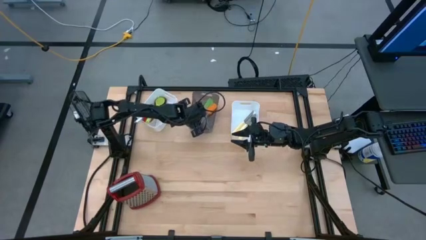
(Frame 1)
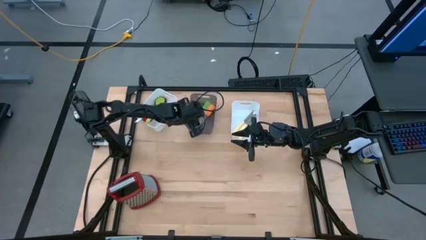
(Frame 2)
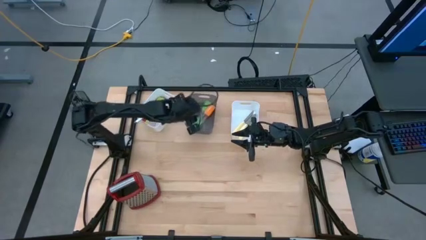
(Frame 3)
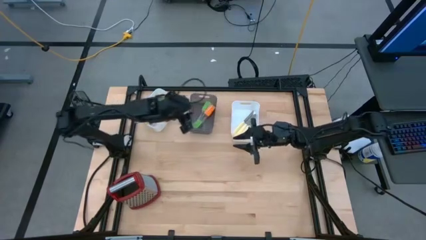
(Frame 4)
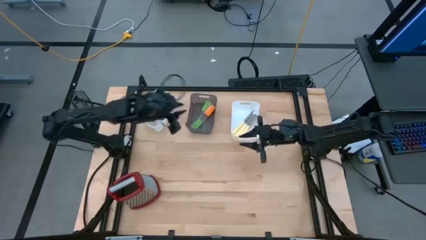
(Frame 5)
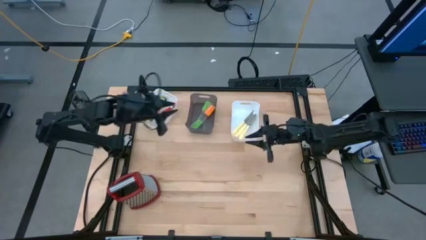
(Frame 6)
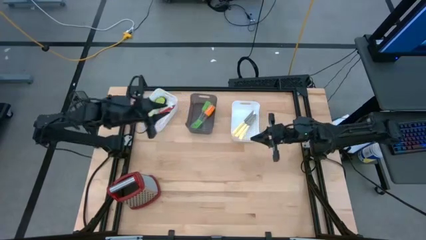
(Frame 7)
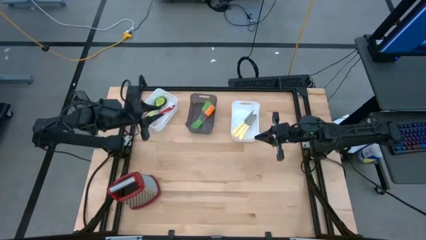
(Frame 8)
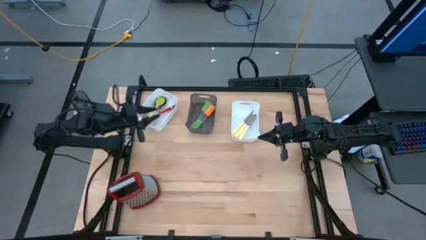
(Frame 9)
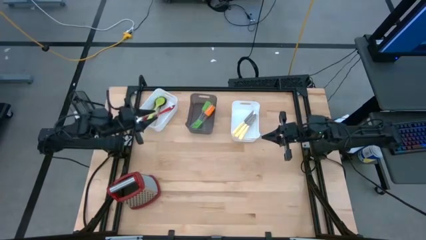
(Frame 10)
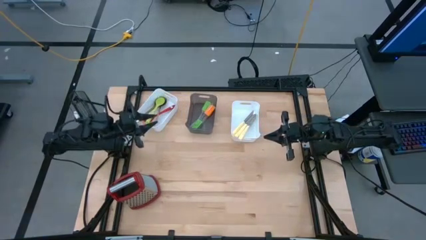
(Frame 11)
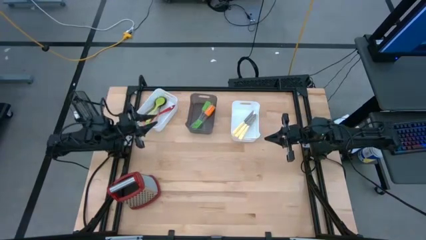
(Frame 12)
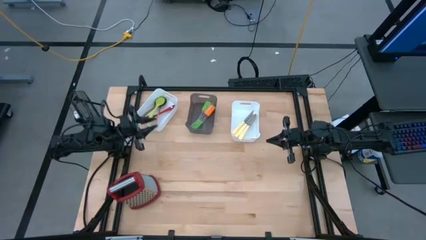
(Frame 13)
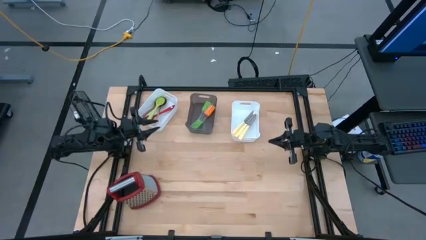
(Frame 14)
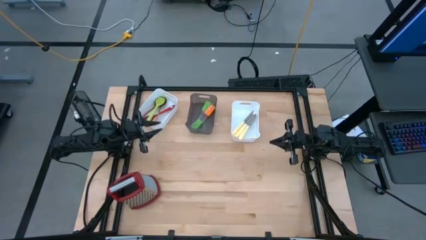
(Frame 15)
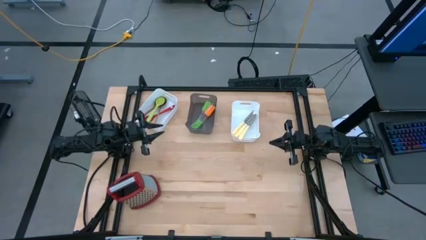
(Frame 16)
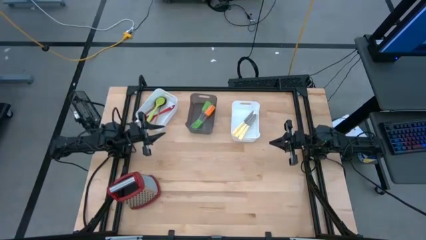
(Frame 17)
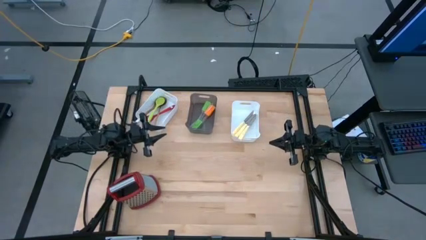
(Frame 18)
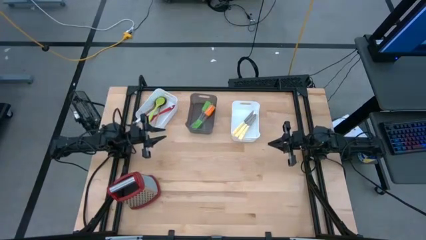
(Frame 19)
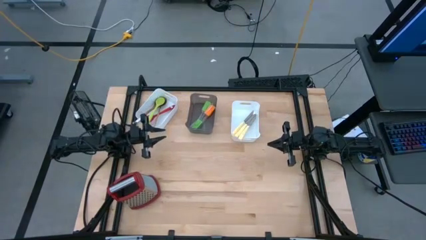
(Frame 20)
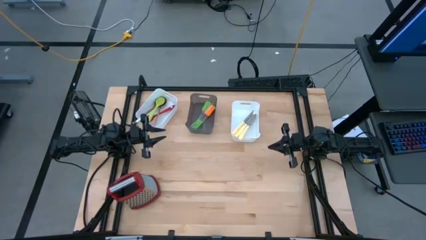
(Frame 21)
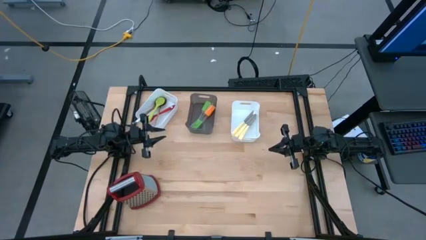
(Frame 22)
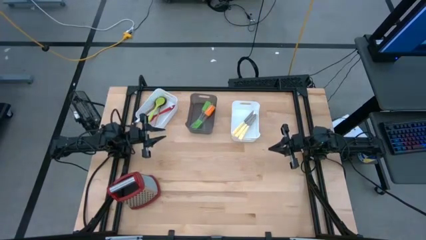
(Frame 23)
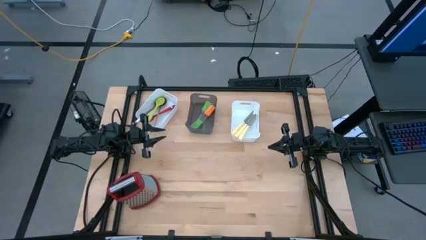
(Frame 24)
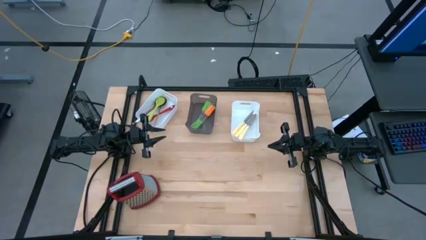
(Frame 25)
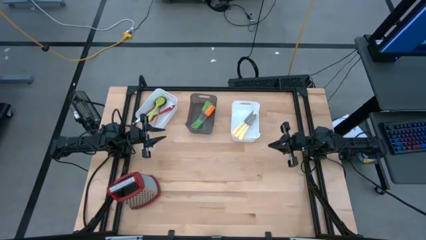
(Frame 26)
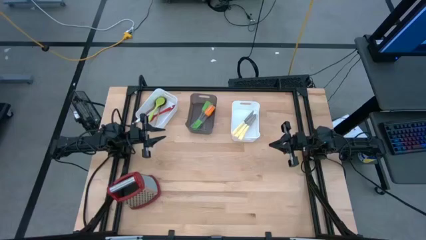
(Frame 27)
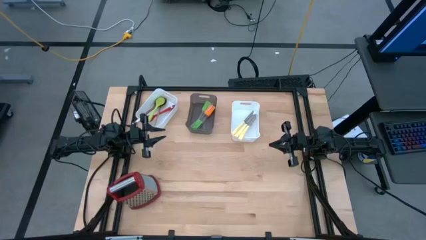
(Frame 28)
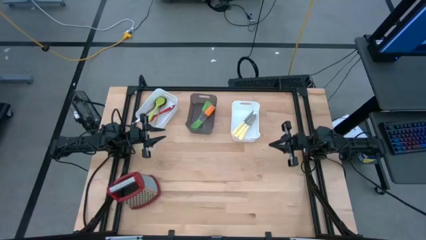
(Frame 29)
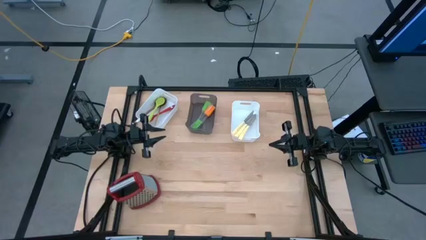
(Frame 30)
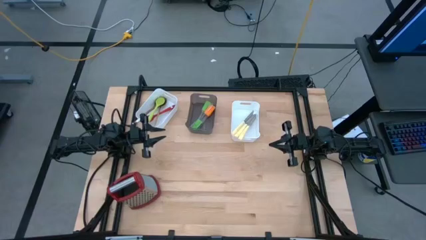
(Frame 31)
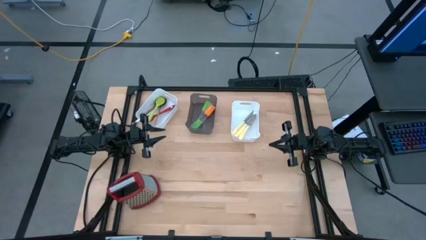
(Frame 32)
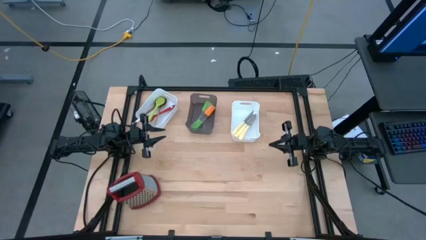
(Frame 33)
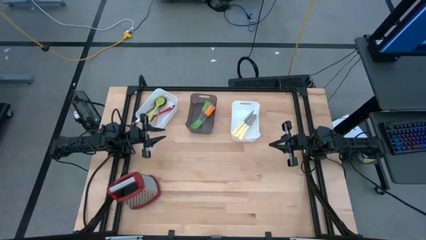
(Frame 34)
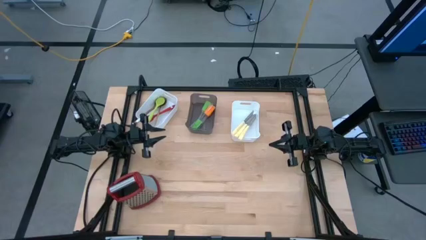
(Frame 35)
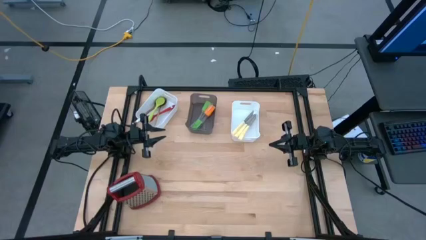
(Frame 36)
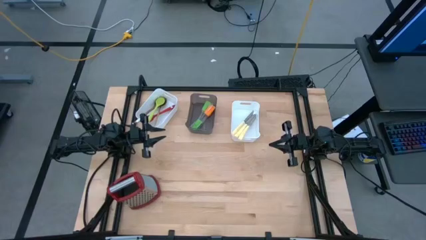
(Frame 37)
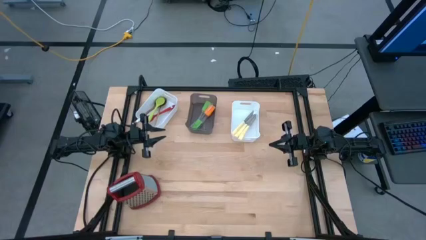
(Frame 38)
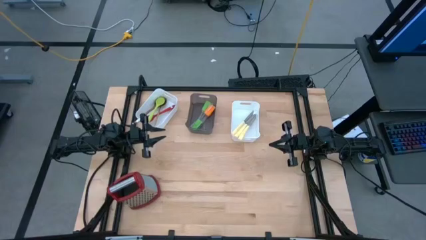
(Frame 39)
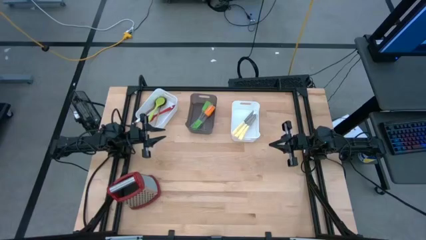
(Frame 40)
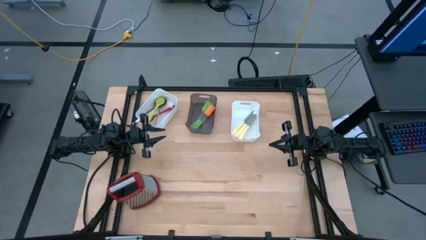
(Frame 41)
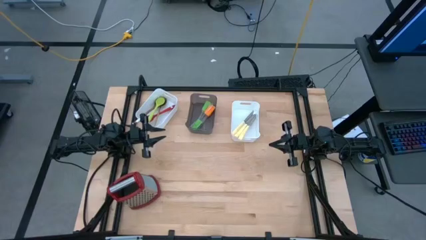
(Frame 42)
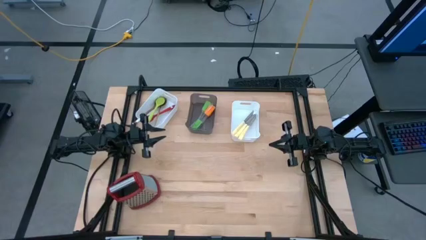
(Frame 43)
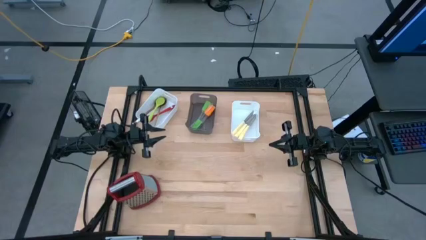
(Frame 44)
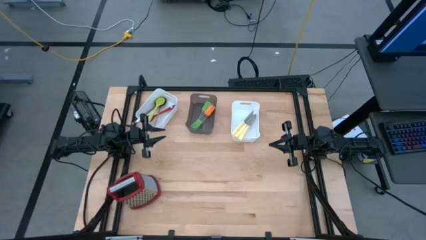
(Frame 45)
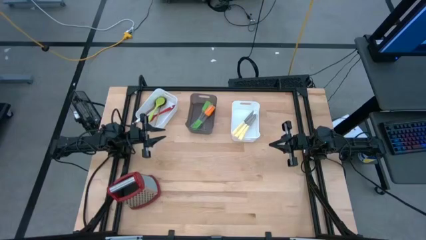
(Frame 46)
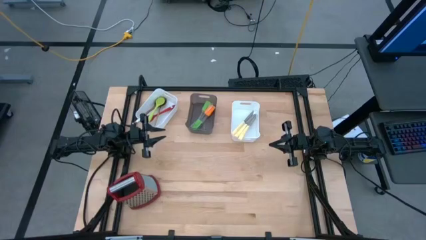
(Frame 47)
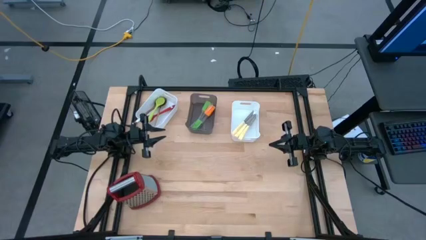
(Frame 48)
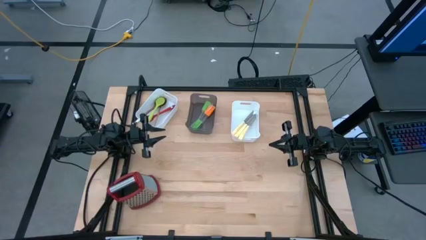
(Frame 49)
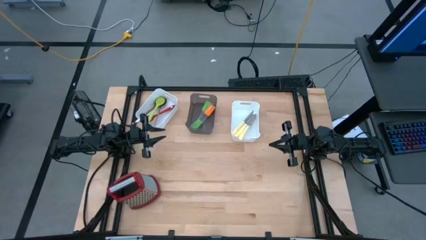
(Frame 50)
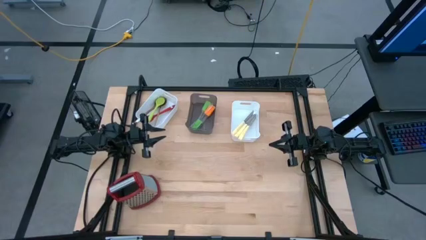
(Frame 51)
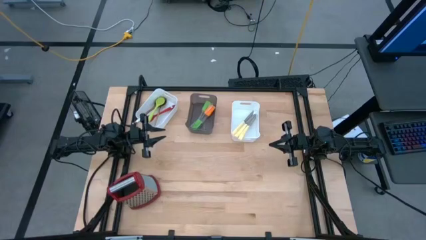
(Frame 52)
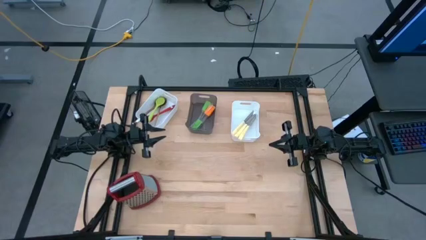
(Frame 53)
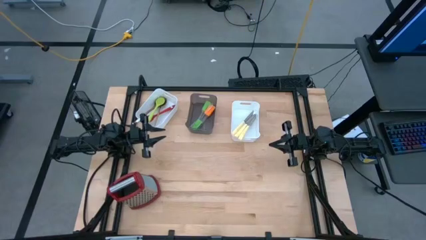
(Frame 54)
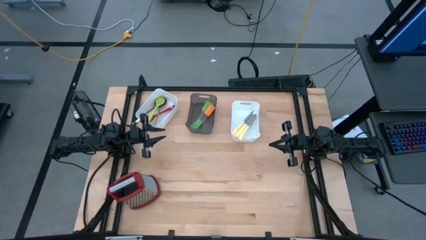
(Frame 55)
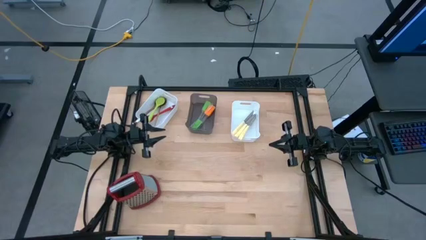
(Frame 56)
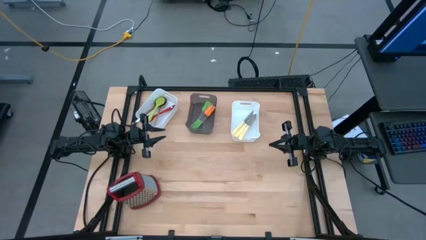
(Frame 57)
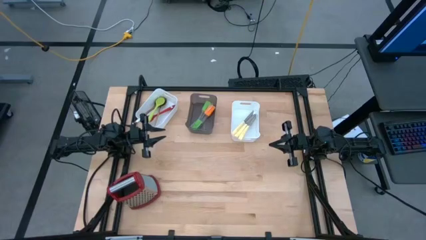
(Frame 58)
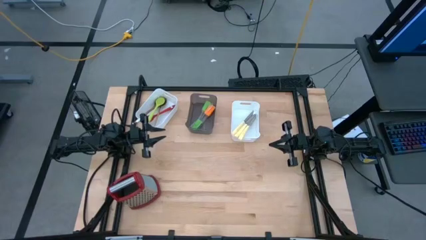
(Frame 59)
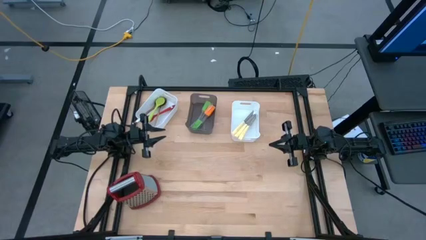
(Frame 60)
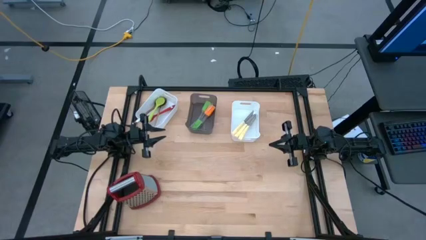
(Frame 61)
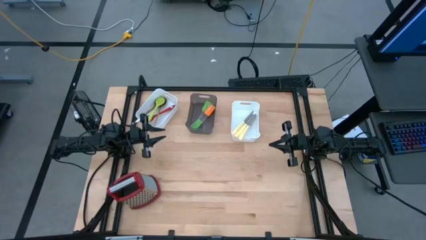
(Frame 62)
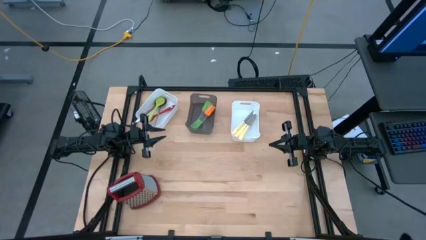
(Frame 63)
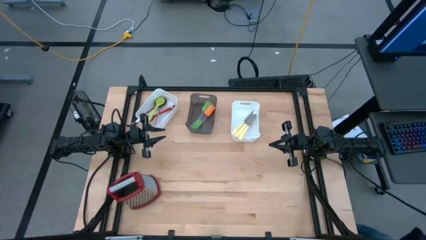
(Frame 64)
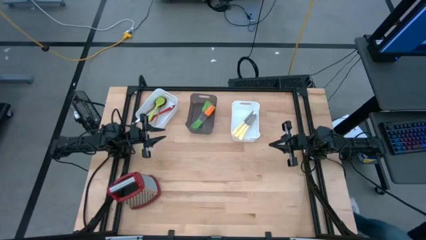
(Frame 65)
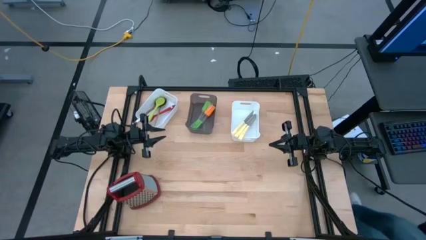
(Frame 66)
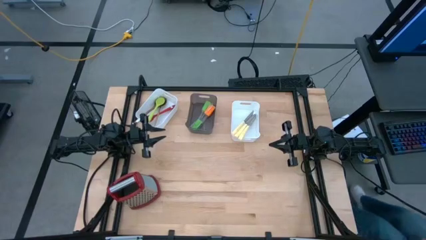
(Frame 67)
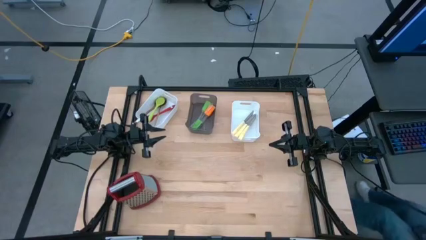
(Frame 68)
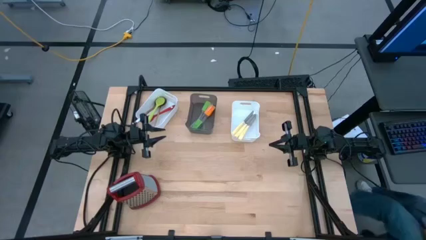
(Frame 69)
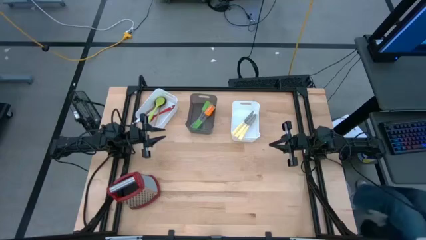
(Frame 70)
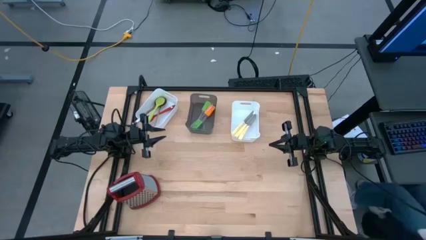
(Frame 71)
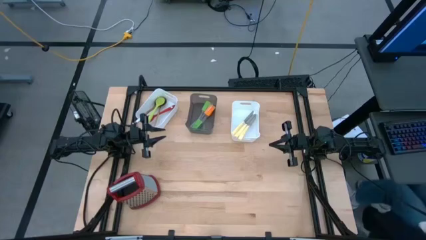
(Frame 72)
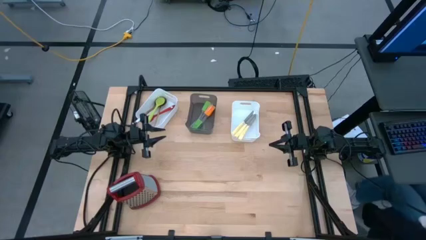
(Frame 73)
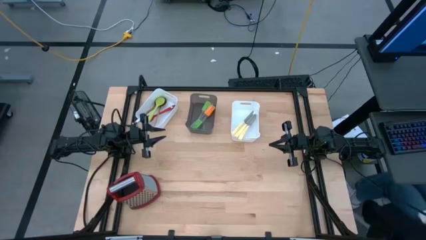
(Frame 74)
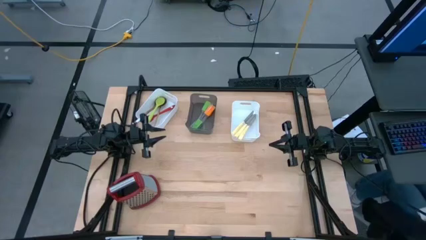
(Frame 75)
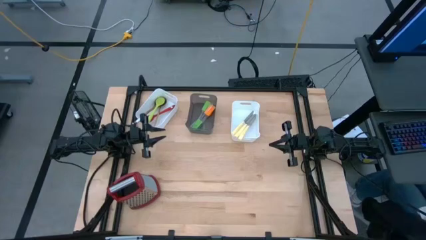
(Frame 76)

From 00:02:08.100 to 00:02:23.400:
Task: Pick & Place Kitchen Items
Return to Home Position
